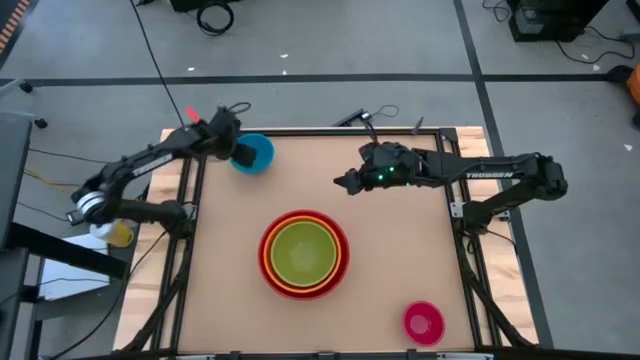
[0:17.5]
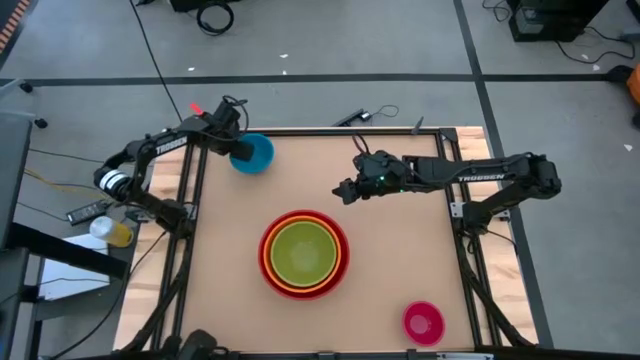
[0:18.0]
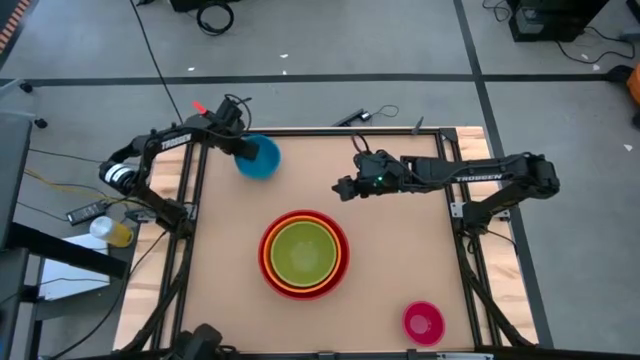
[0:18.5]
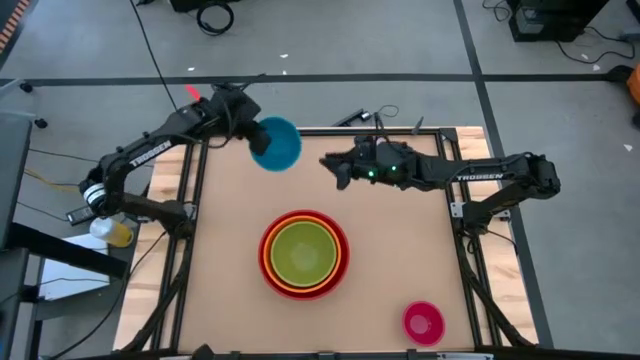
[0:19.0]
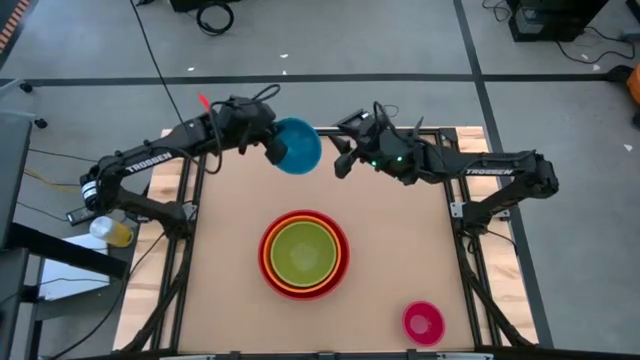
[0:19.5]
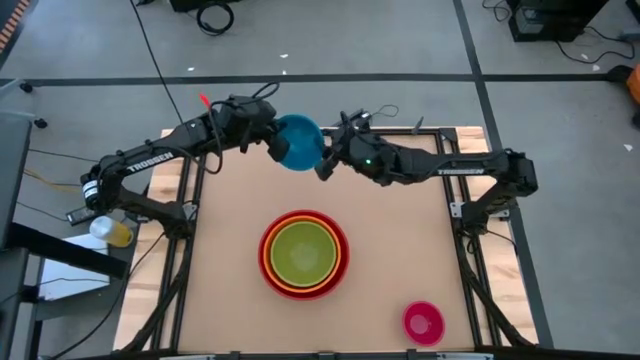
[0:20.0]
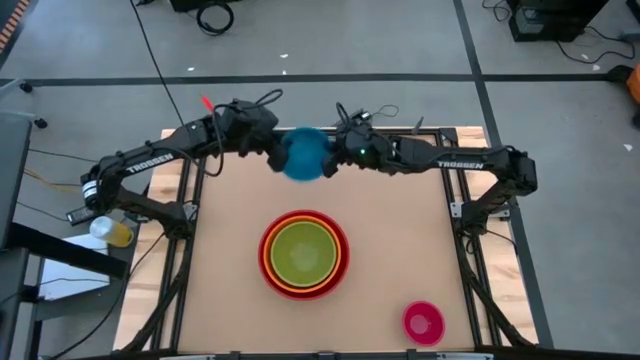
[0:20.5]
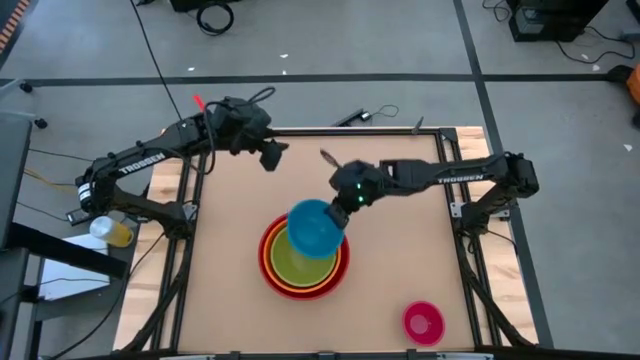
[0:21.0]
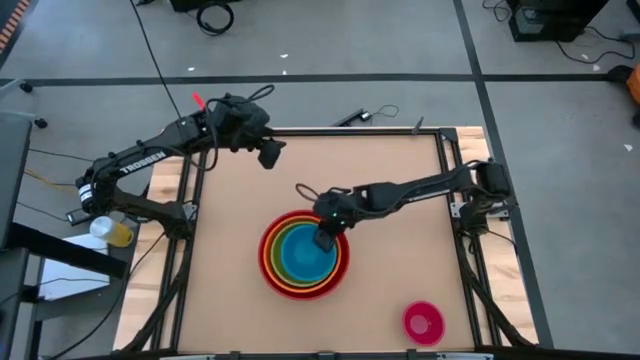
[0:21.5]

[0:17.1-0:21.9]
Stack the blue bowl into the green bowl

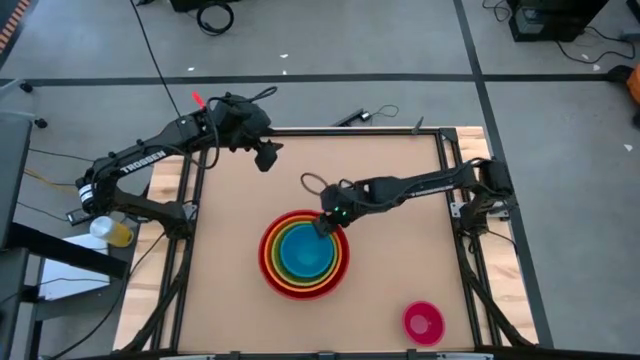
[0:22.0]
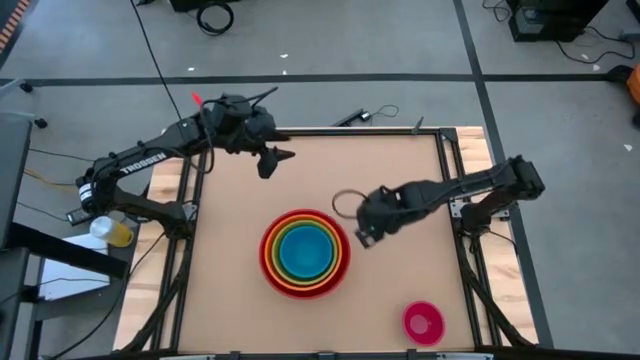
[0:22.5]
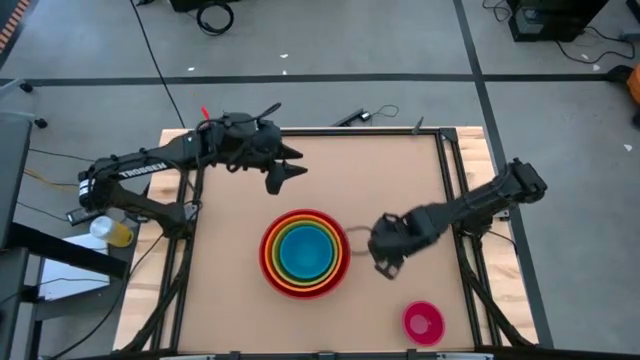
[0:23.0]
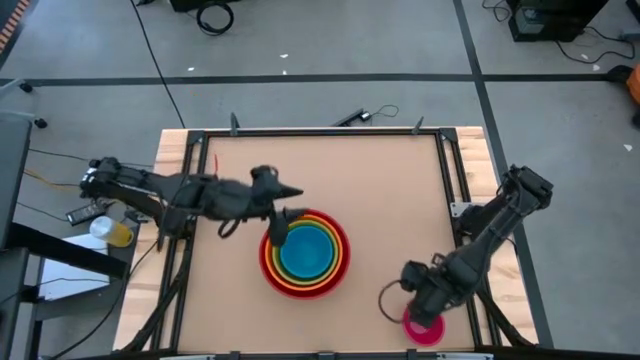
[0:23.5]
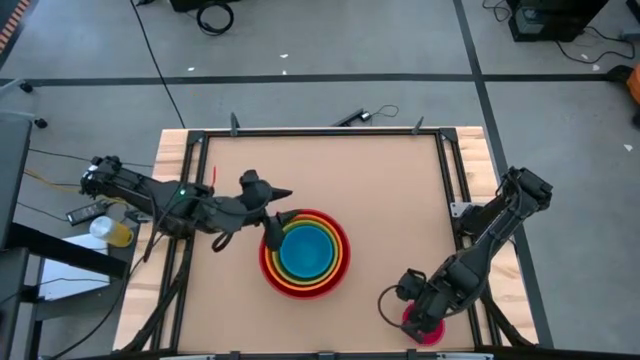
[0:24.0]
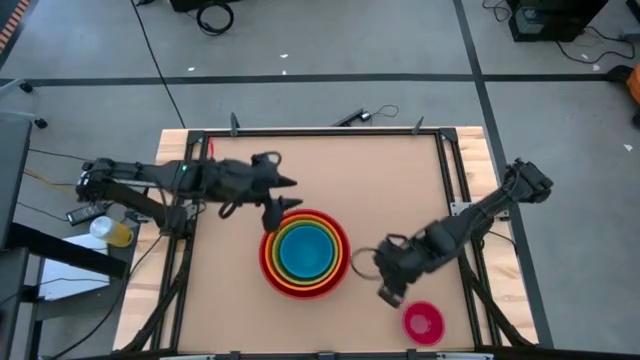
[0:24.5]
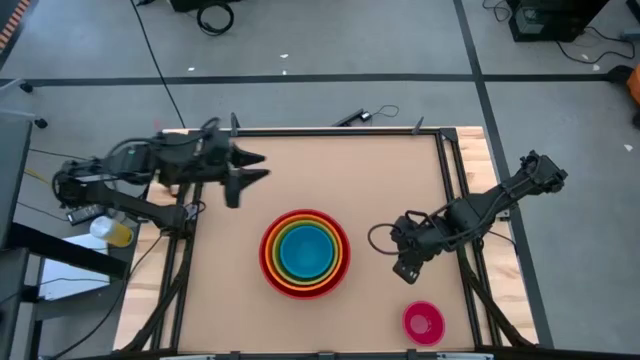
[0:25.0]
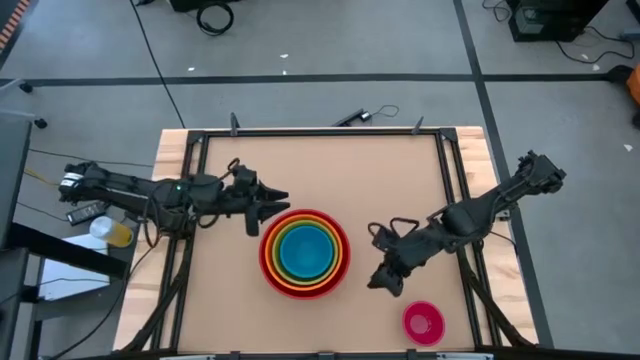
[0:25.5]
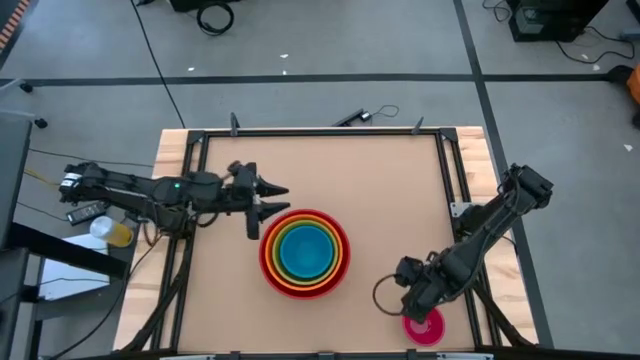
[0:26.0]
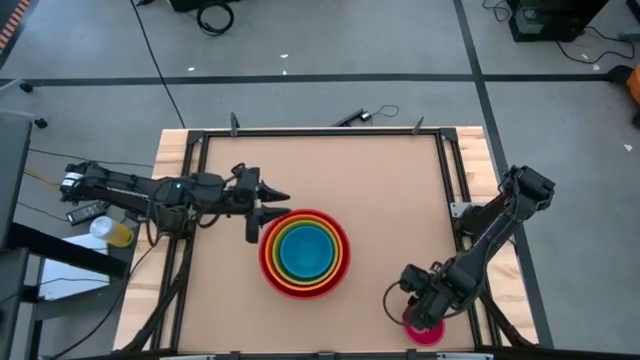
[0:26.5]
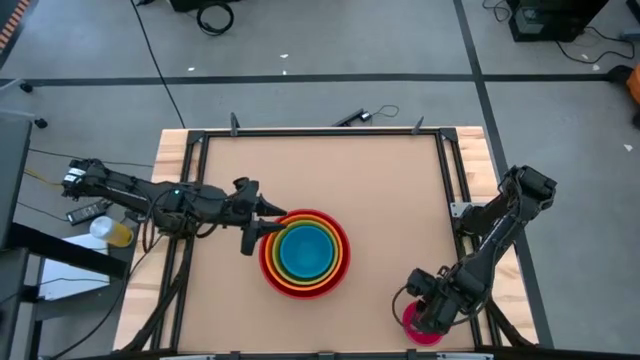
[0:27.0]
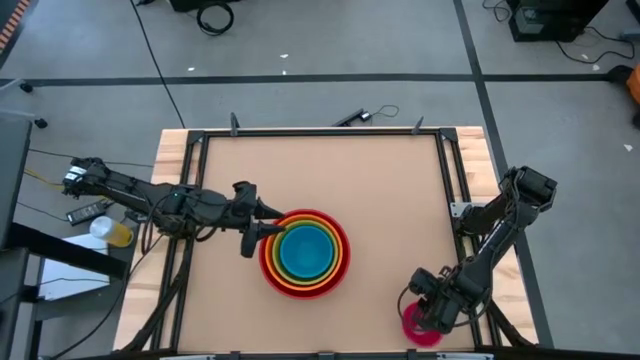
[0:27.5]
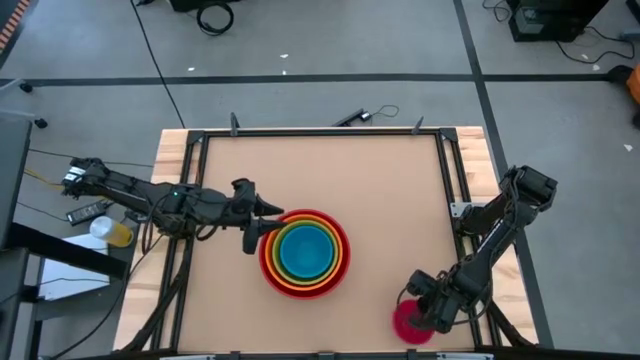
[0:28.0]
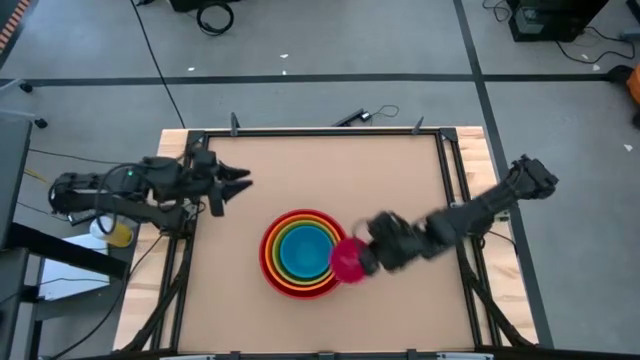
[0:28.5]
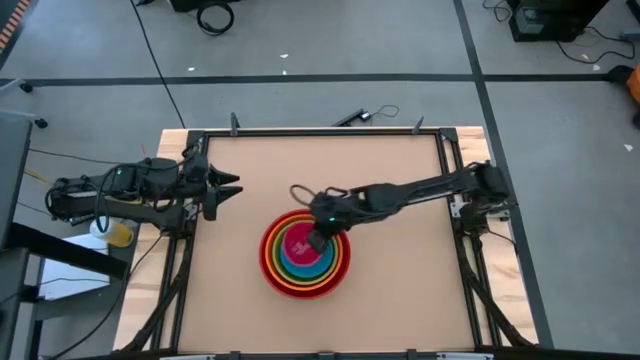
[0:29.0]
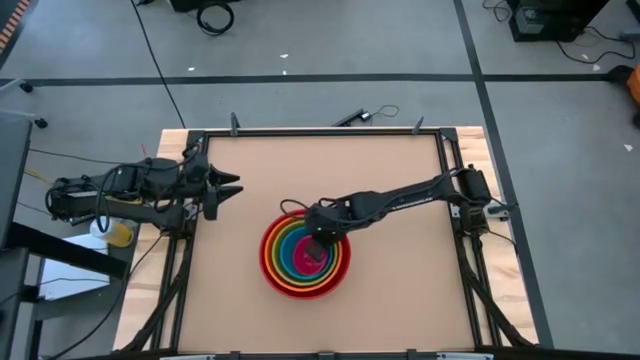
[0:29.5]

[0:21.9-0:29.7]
Stack the pink bowl into the blue bowl

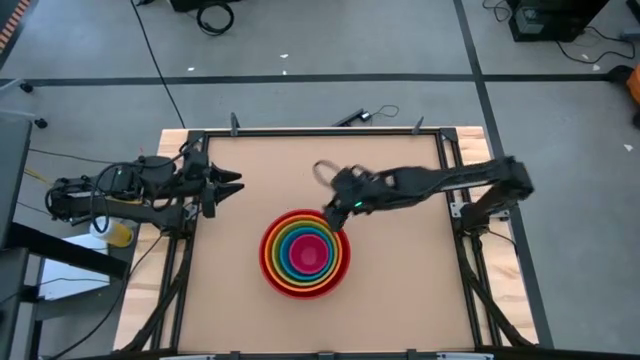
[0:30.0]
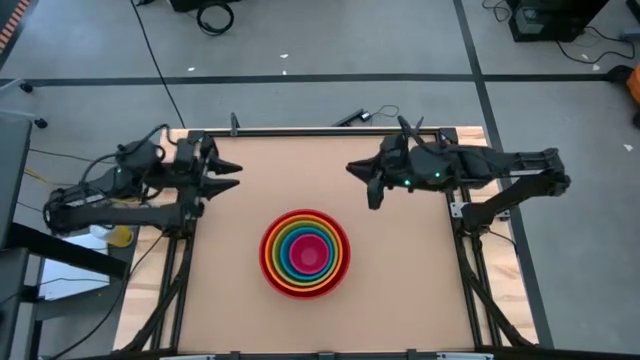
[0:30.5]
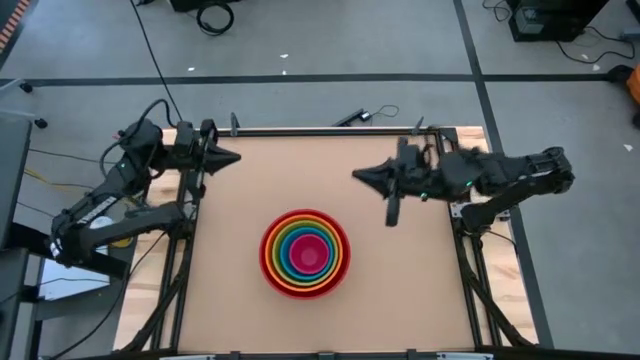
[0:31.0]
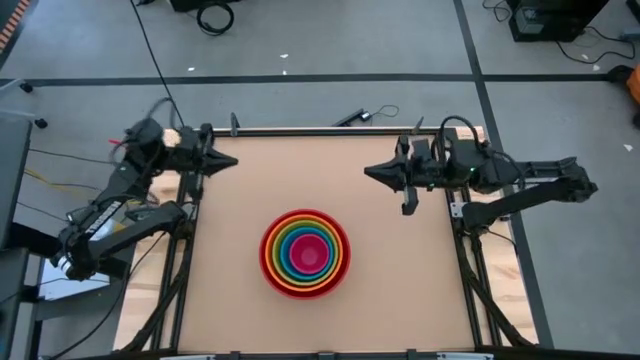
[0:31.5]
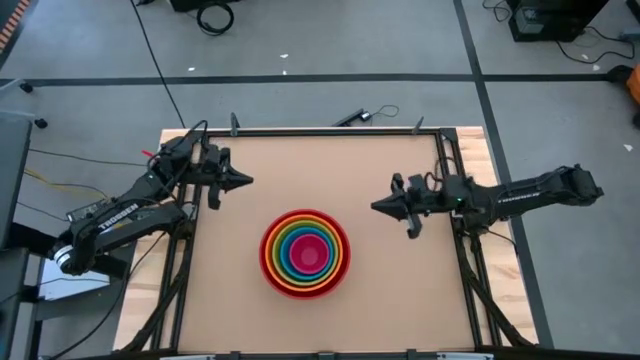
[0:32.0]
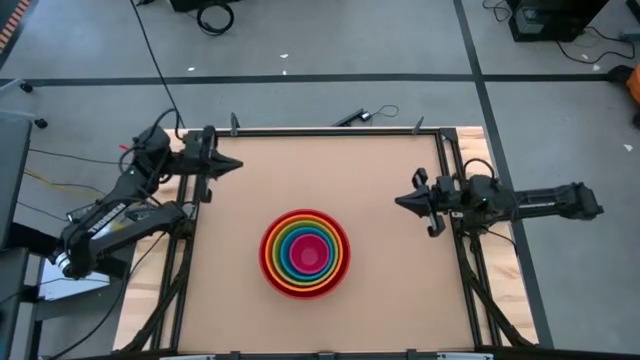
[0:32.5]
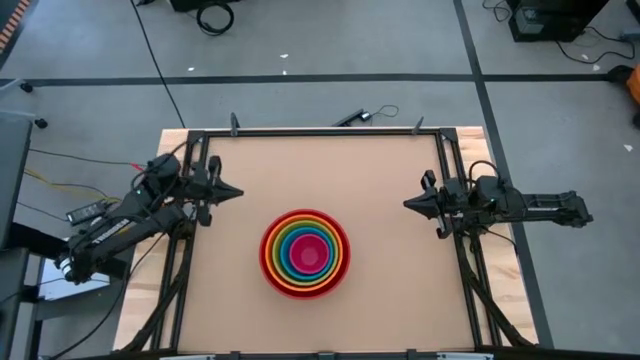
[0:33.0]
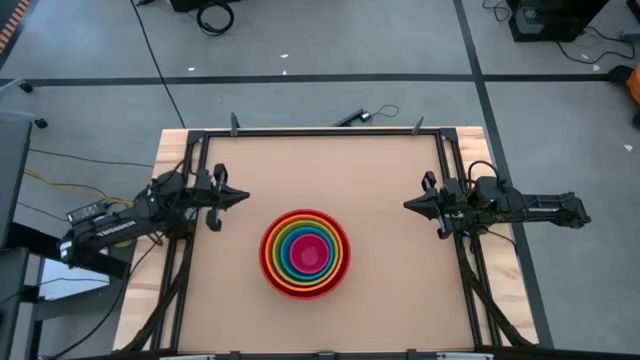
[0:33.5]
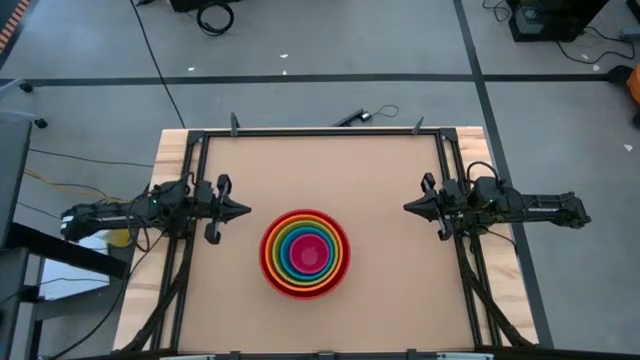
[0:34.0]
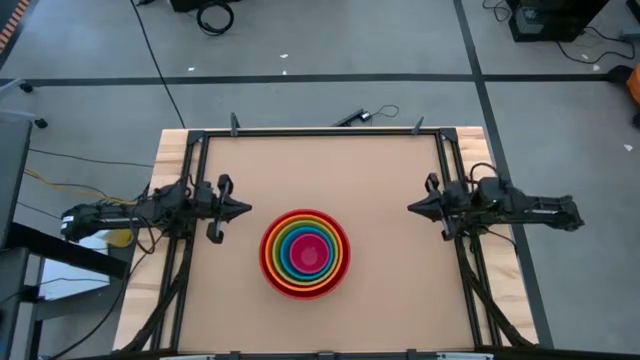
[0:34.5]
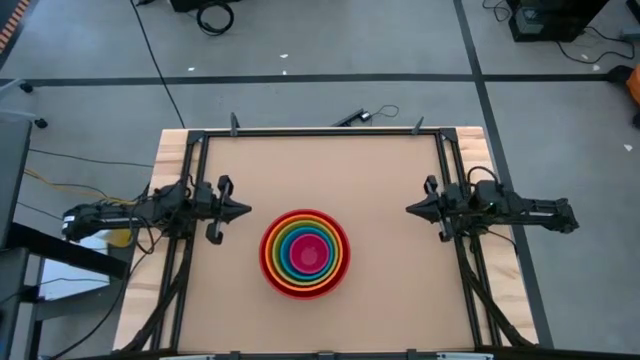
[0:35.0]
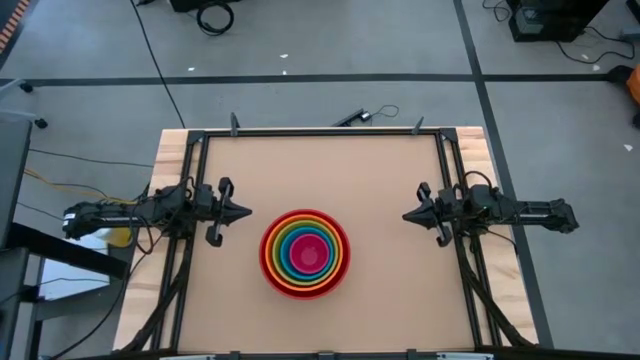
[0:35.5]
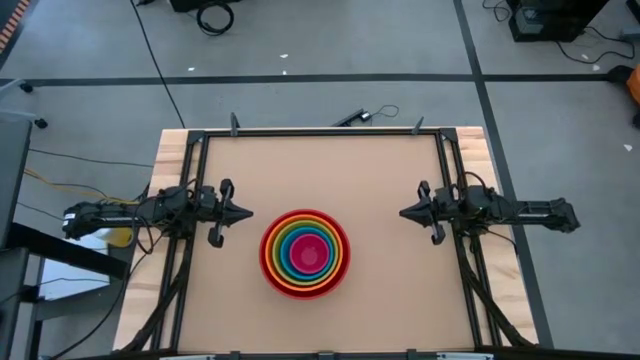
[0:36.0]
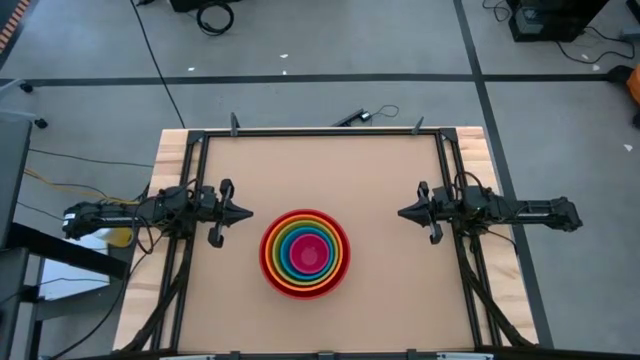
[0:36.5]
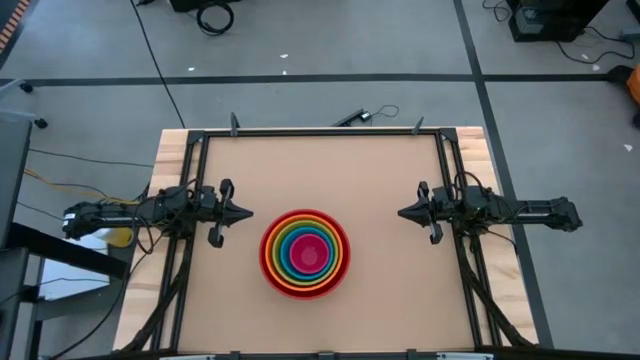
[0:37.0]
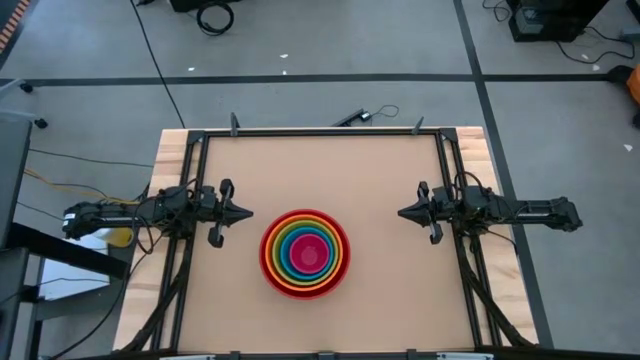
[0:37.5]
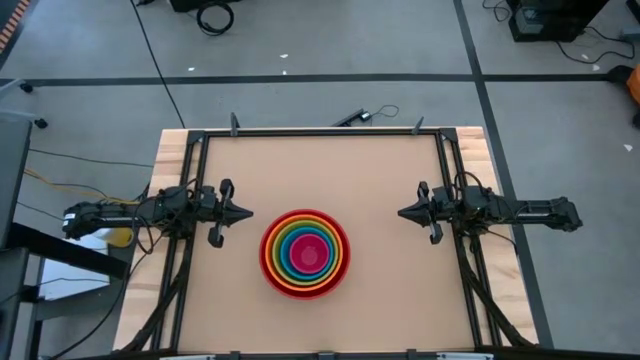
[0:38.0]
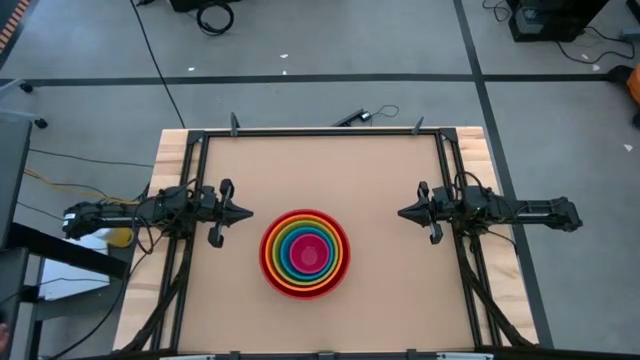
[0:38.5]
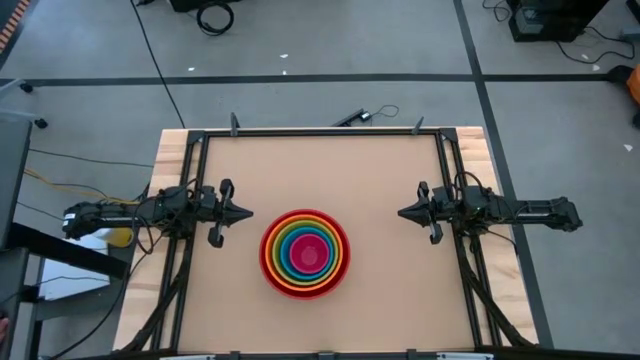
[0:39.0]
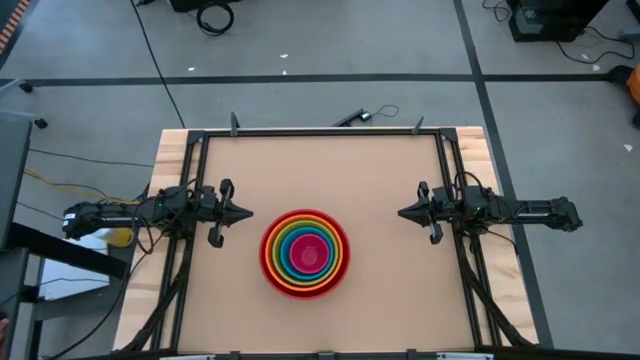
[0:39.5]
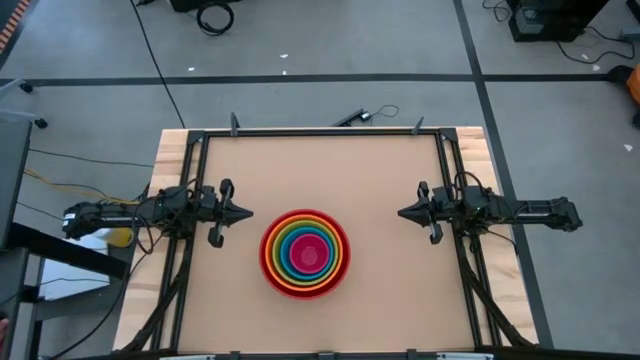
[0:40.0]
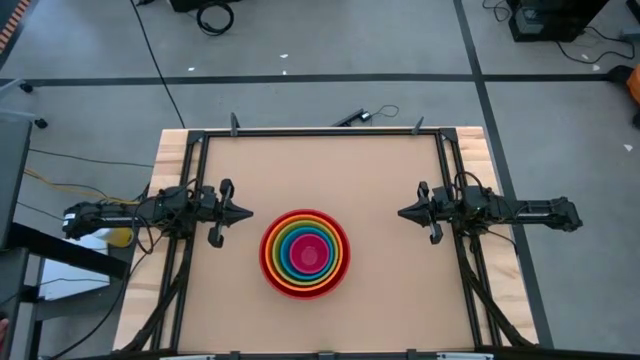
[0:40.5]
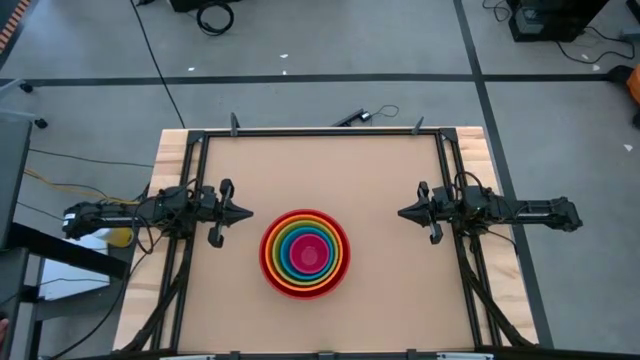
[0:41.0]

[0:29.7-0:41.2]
Return to Home Position
